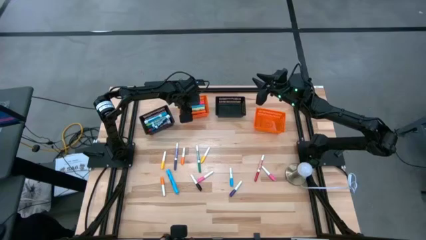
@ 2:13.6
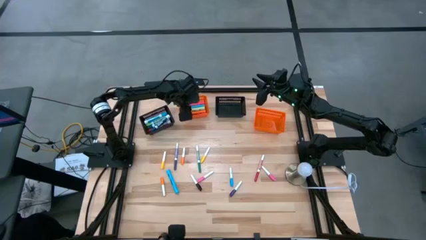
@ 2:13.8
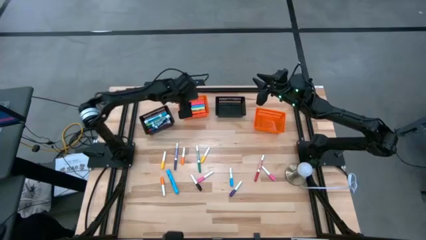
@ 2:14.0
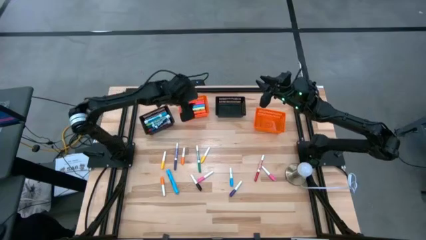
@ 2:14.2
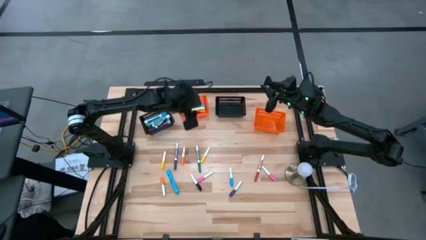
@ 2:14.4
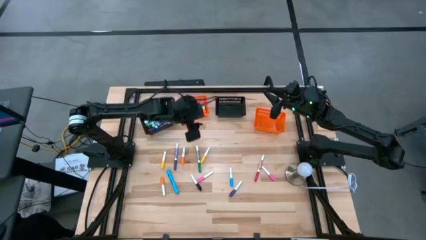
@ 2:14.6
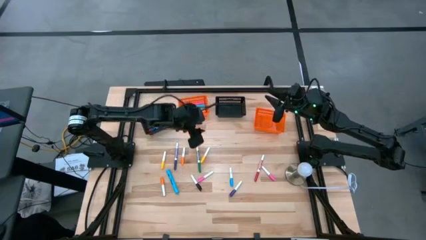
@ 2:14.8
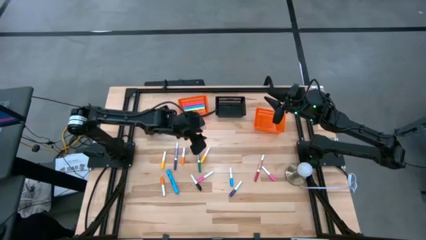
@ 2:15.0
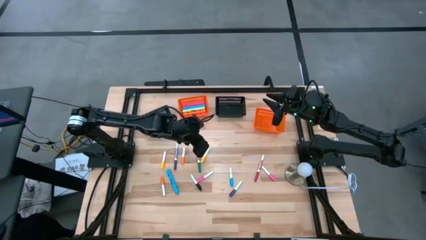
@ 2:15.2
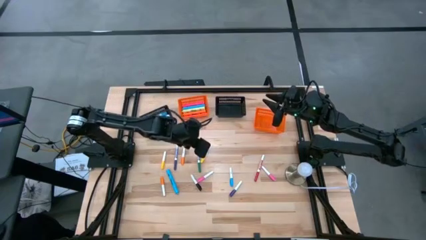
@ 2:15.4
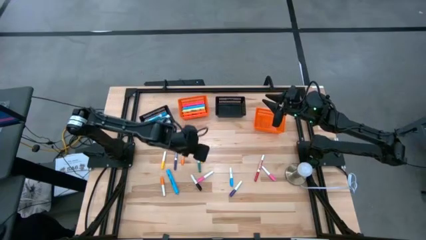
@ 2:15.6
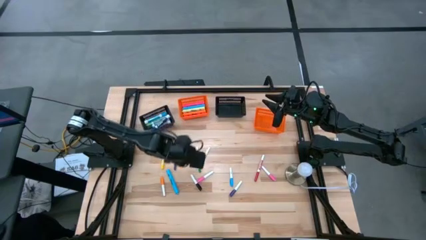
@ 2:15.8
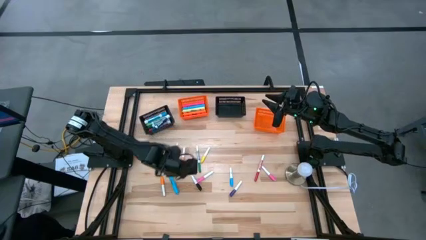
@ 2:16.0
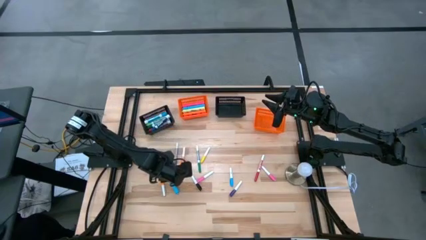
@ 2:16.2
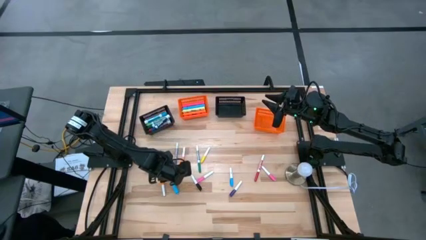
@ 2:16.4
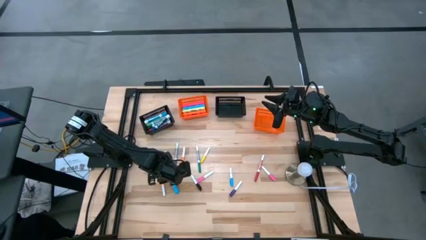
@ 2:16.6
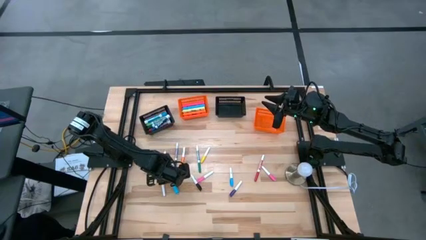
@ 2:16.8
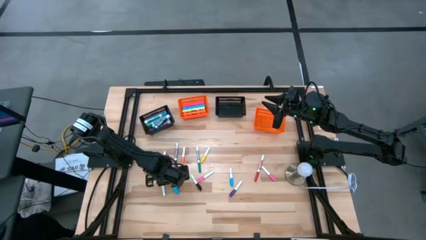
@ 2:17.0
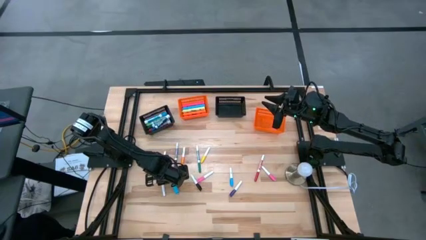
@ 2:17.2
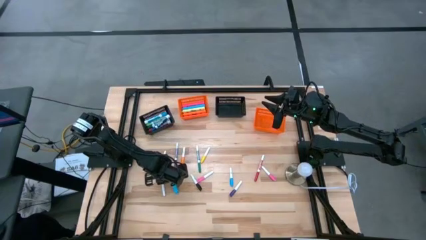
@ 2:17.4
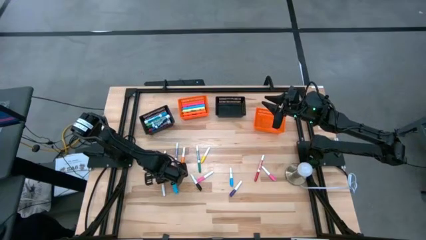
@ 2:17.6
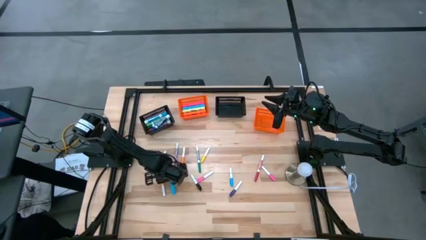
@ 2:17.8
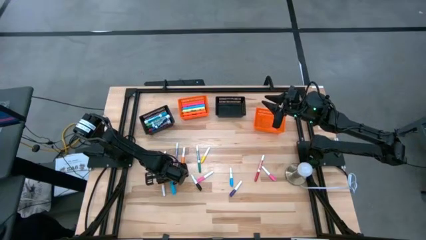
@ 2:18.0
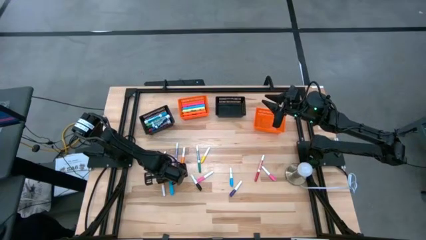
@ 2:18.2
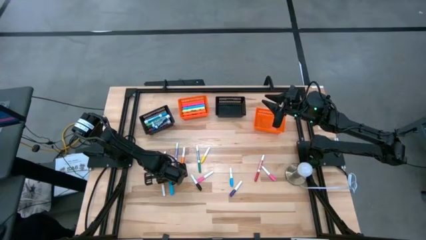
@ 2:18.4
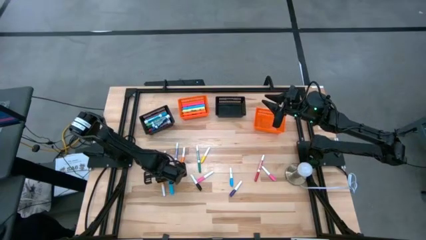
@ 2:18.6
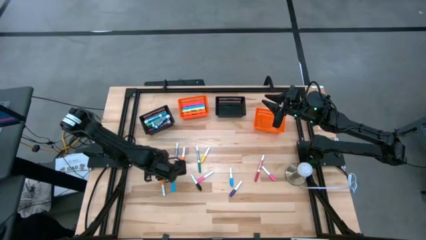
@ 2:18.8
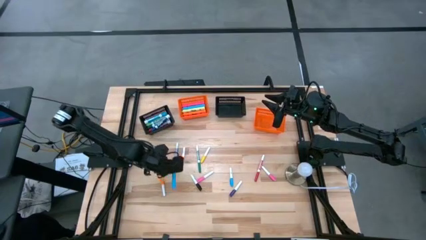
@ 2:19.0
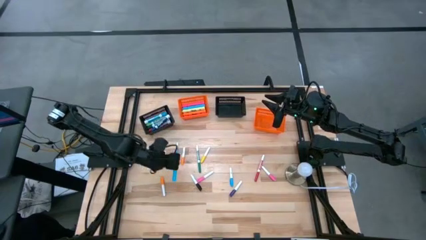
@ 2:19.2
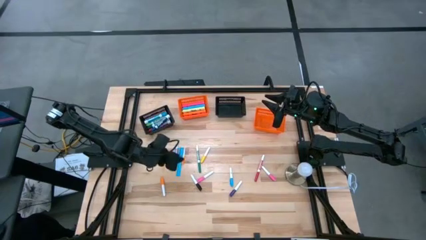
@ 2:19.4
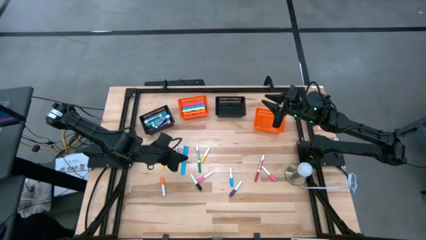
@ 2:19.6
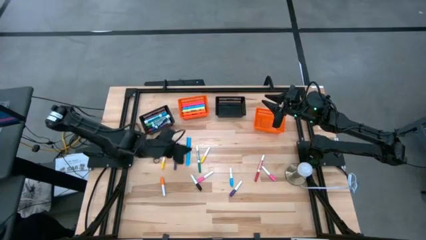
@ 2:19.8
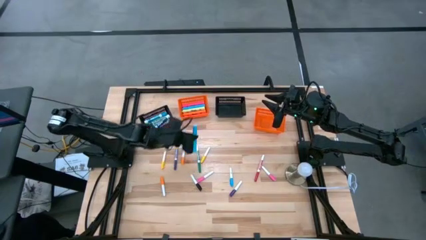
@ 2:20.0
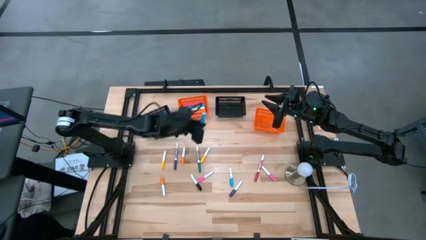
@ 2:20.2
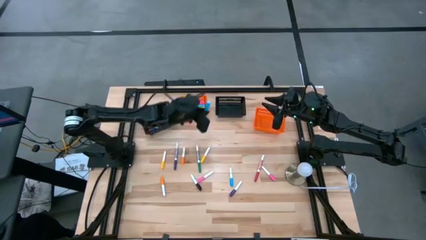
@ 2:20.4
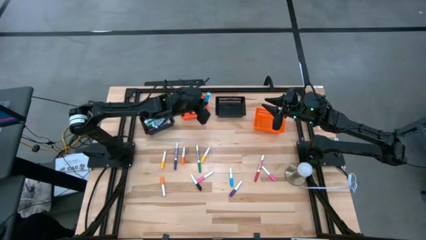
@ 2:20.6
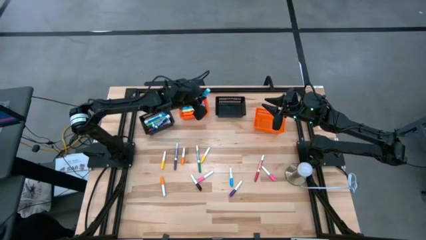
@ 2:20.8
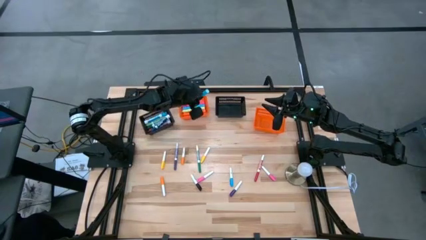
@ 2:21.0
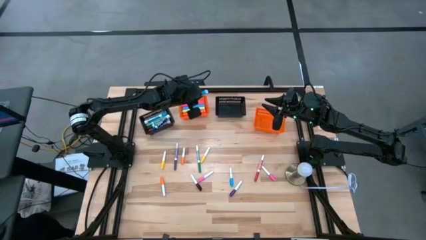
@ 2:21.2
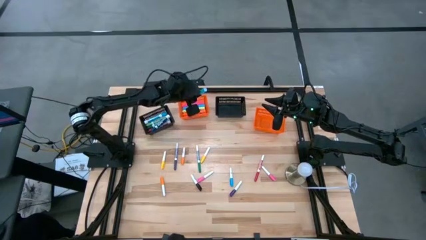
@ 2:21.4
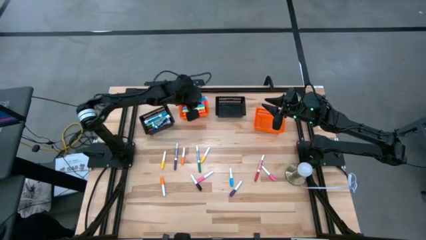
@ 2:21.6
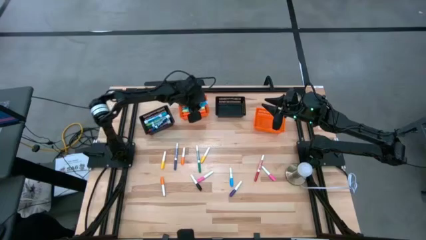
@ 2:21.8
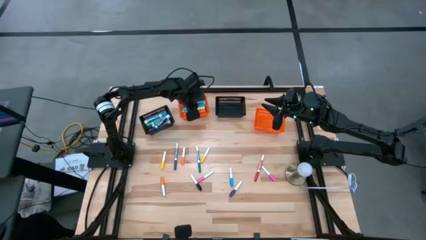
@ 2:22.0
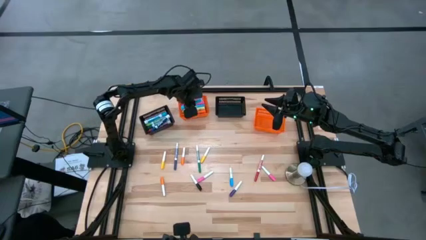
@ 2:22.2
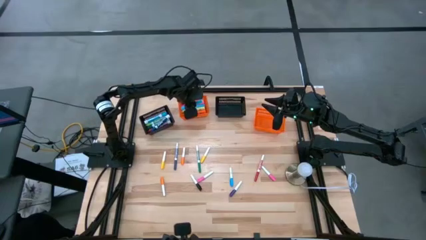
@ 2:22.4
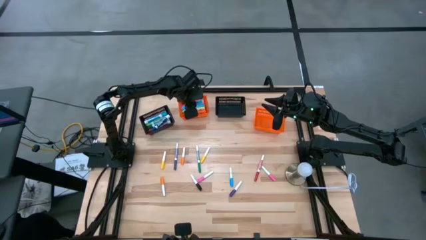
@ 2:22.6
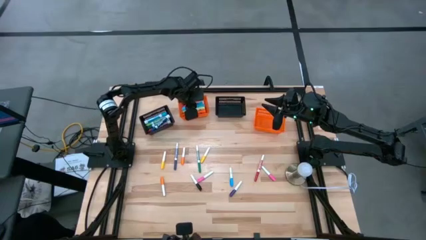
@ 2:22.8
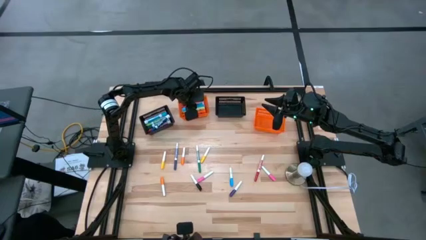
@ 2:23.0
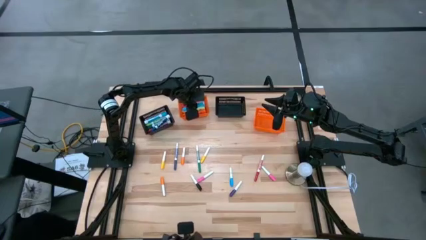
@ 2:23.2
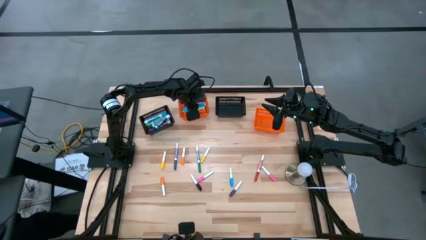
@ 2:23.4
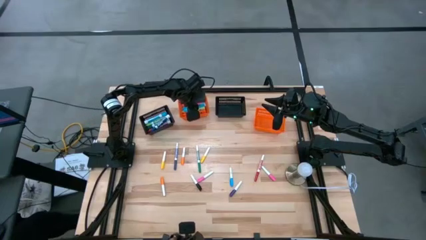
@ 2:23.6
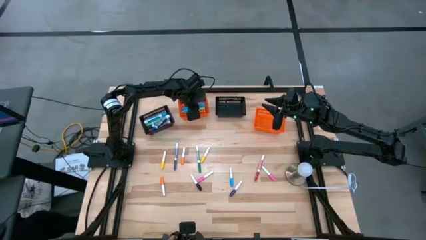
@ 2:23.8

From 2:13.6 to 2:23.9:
Task: Pick & Place Markers
Put the large light blue highlighter pen into the left orange bin
